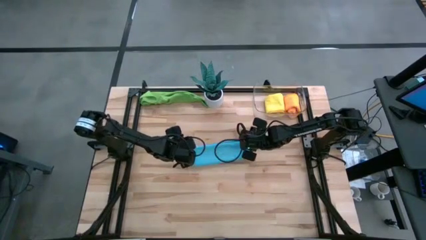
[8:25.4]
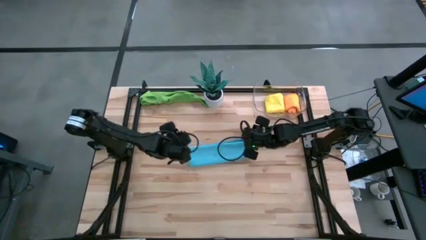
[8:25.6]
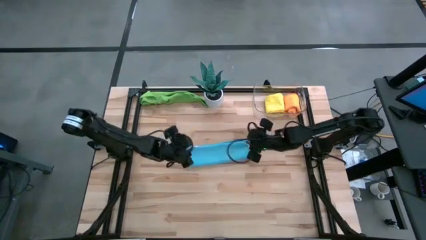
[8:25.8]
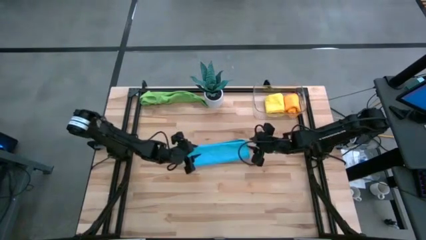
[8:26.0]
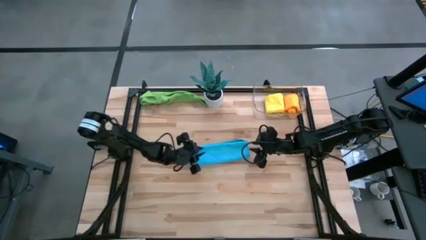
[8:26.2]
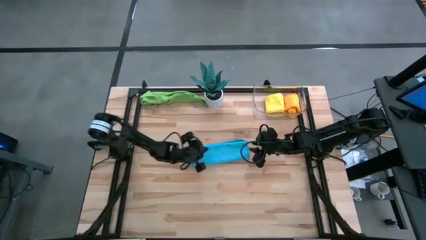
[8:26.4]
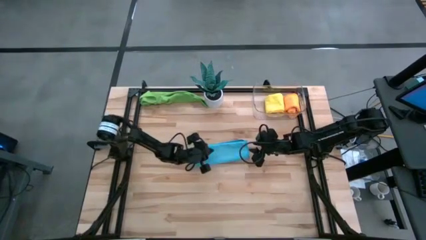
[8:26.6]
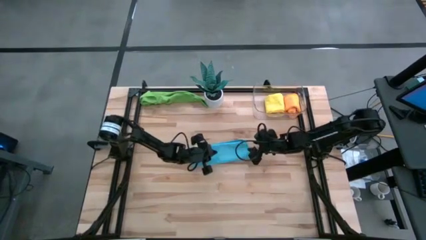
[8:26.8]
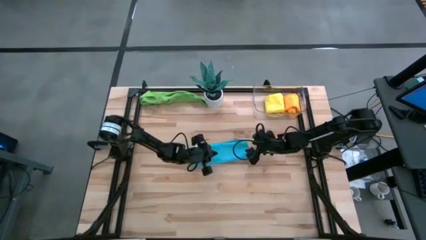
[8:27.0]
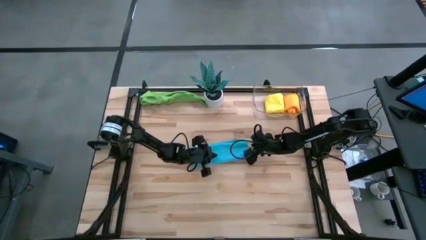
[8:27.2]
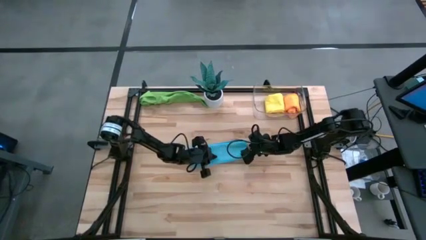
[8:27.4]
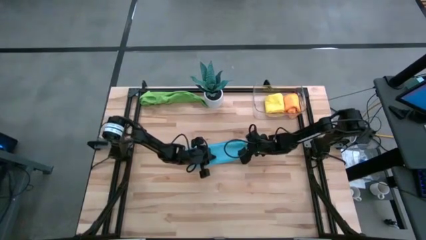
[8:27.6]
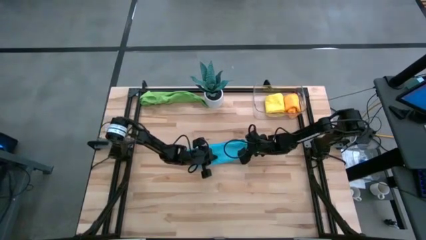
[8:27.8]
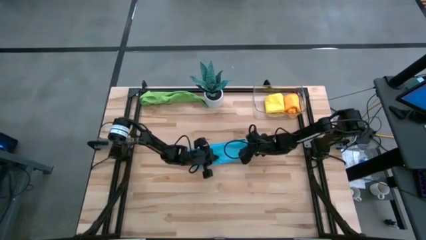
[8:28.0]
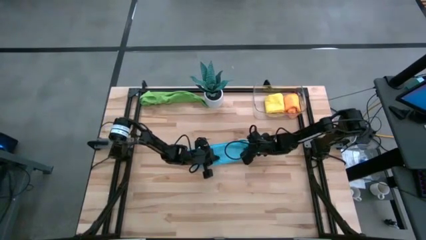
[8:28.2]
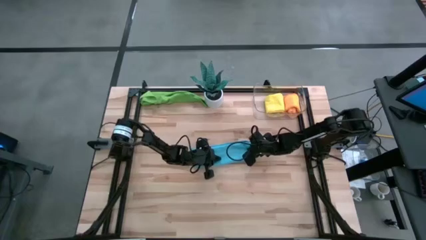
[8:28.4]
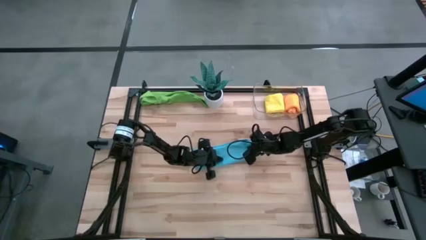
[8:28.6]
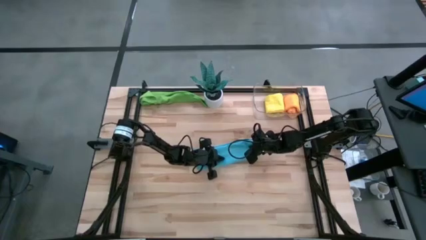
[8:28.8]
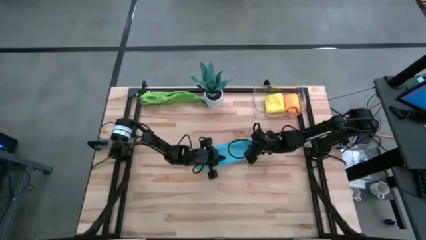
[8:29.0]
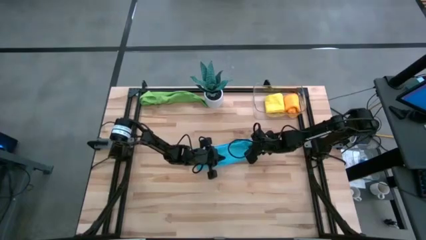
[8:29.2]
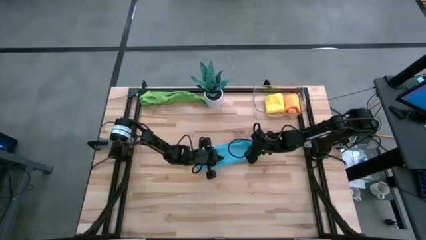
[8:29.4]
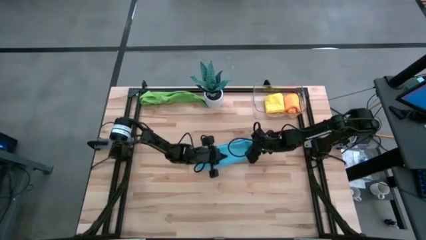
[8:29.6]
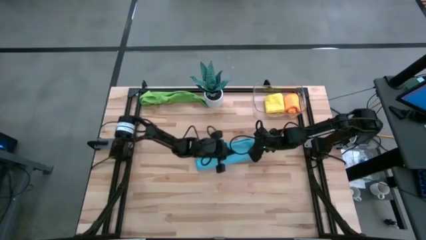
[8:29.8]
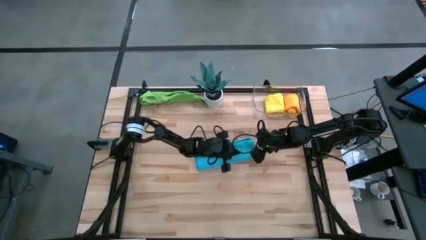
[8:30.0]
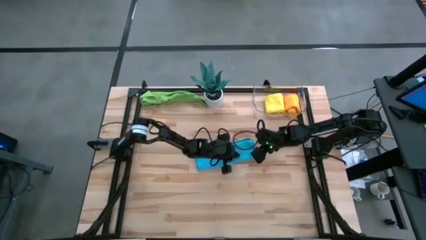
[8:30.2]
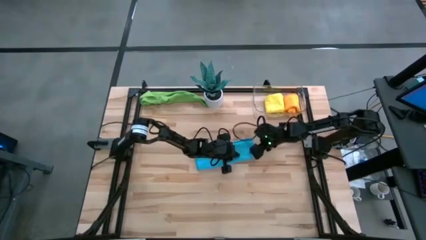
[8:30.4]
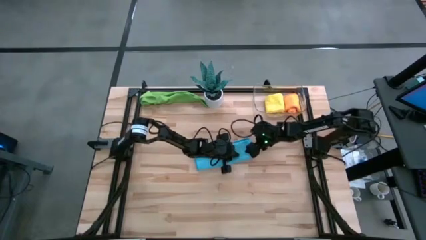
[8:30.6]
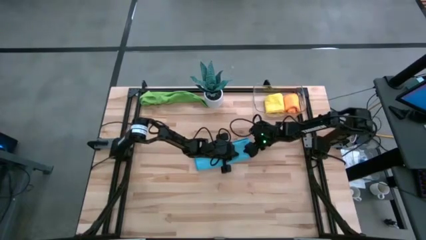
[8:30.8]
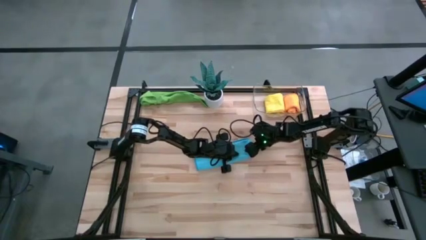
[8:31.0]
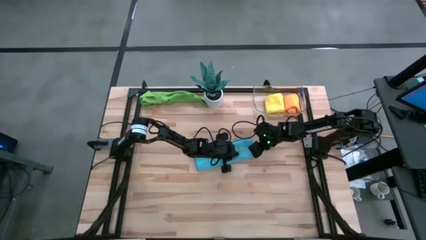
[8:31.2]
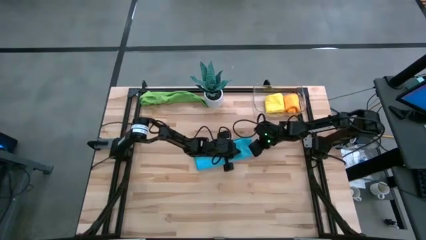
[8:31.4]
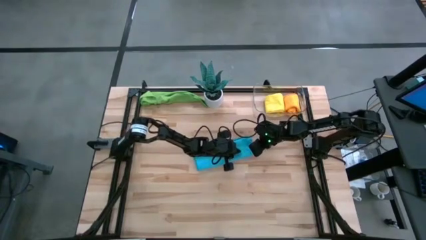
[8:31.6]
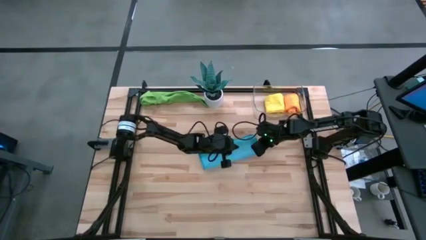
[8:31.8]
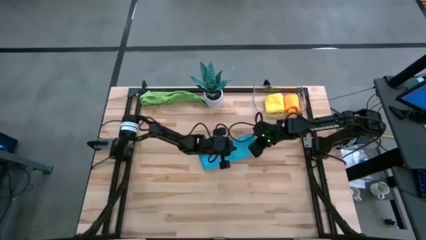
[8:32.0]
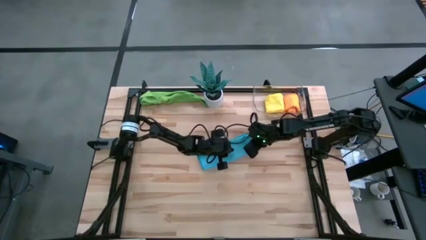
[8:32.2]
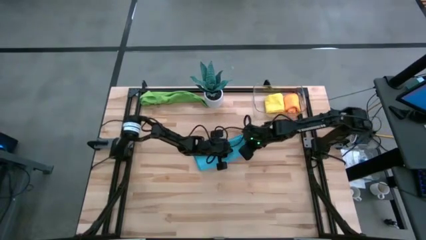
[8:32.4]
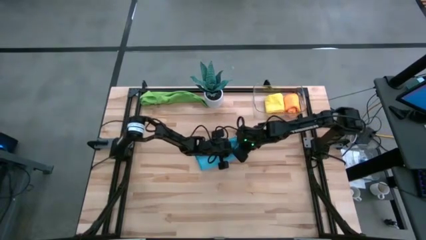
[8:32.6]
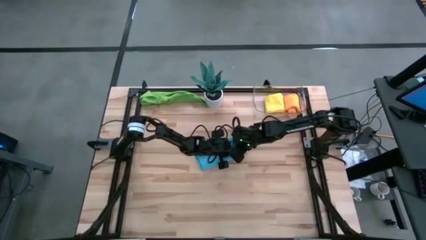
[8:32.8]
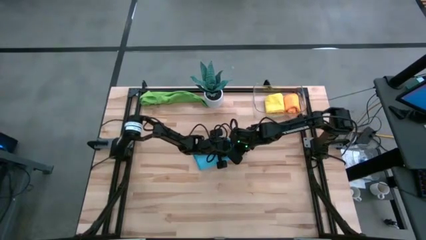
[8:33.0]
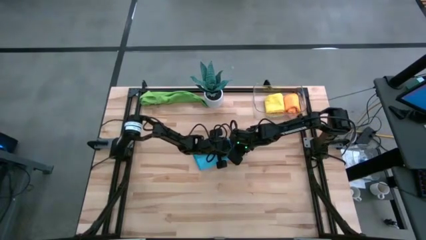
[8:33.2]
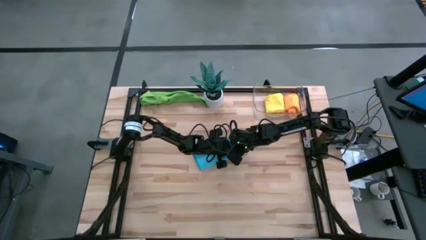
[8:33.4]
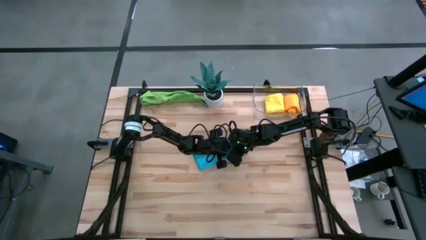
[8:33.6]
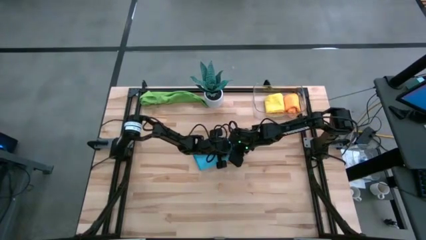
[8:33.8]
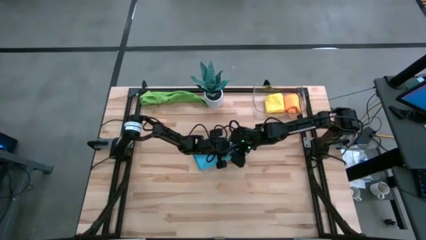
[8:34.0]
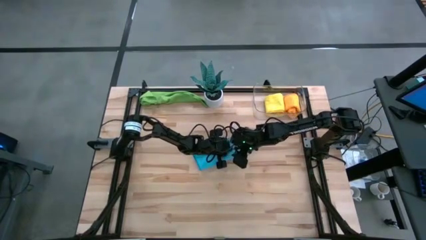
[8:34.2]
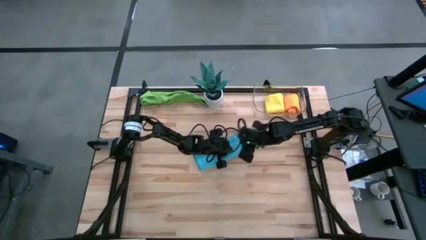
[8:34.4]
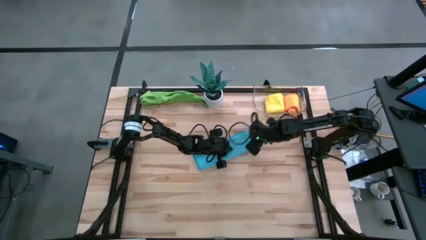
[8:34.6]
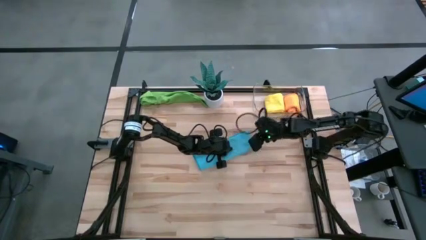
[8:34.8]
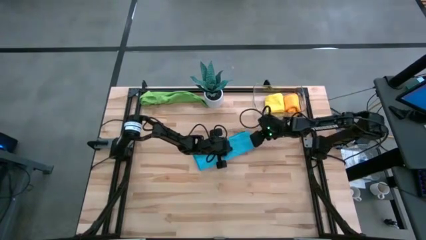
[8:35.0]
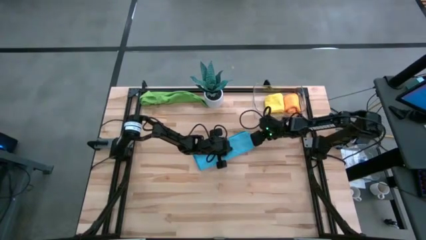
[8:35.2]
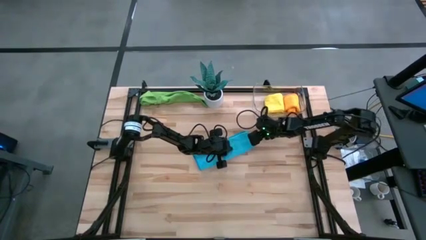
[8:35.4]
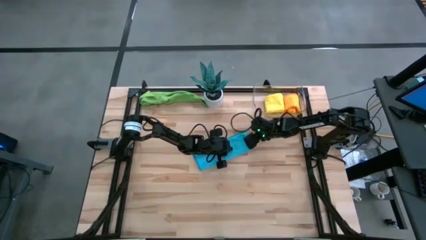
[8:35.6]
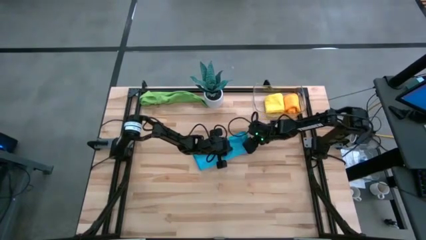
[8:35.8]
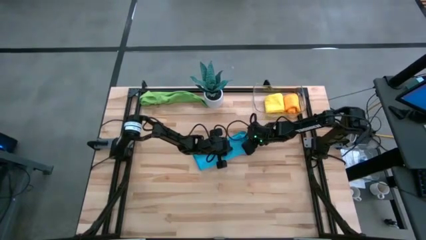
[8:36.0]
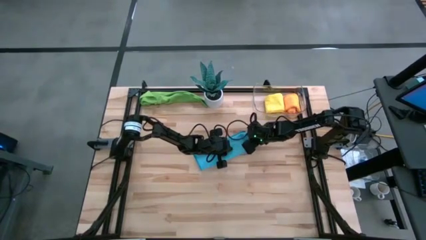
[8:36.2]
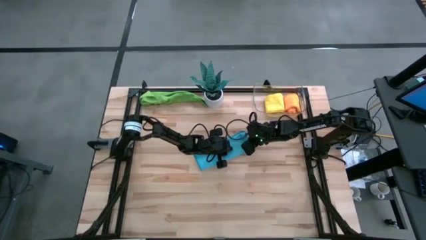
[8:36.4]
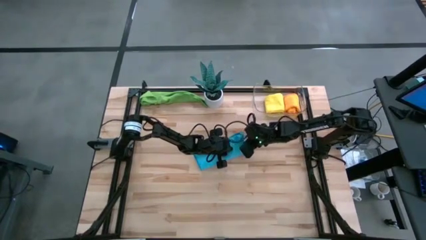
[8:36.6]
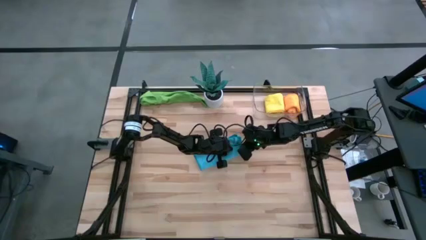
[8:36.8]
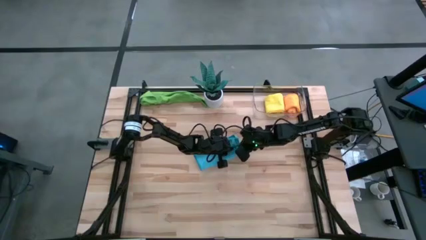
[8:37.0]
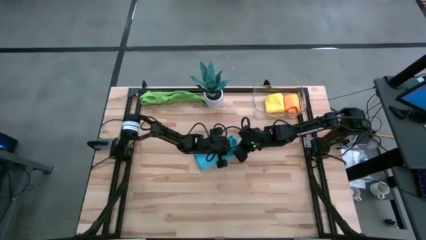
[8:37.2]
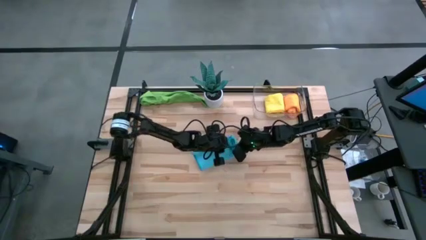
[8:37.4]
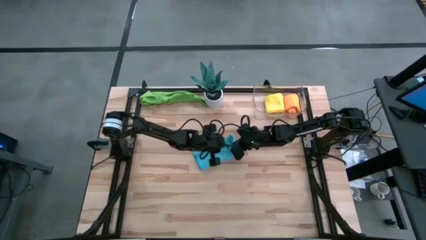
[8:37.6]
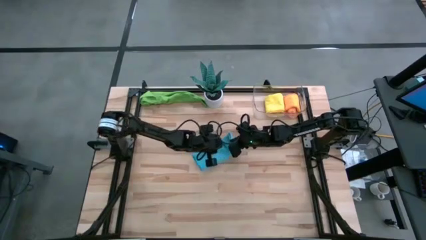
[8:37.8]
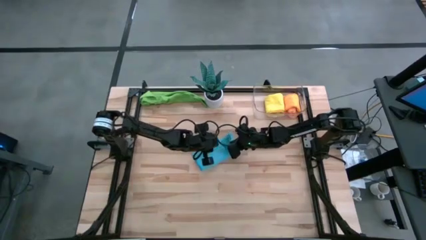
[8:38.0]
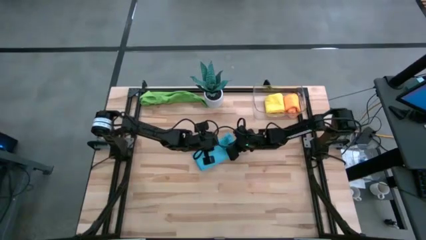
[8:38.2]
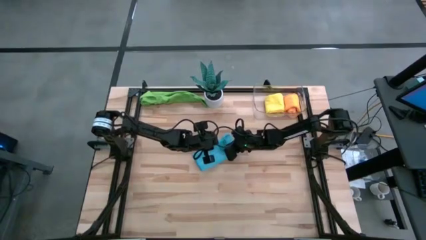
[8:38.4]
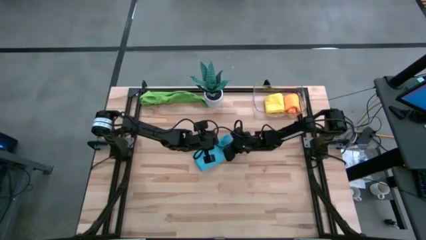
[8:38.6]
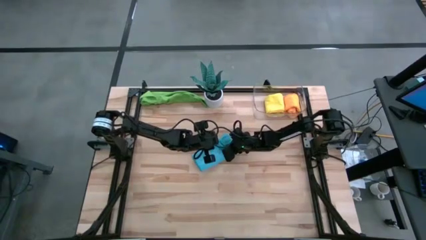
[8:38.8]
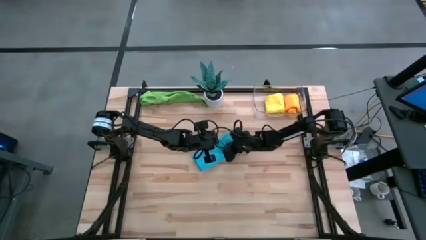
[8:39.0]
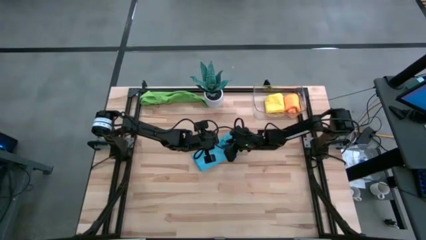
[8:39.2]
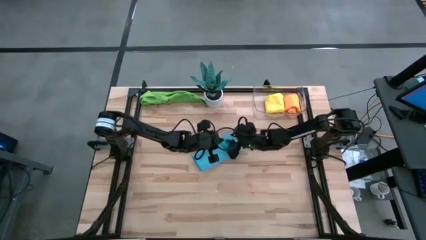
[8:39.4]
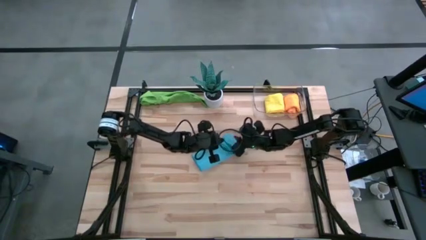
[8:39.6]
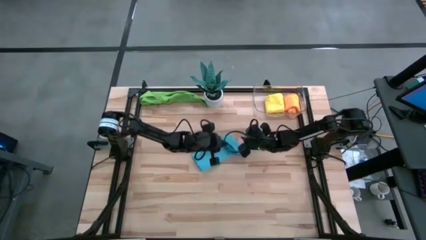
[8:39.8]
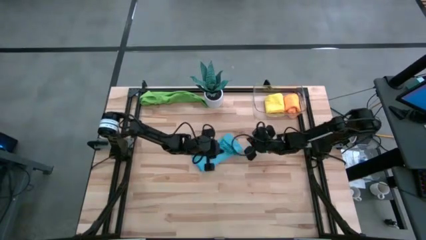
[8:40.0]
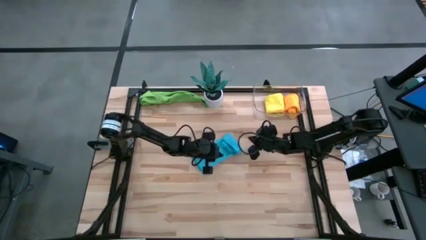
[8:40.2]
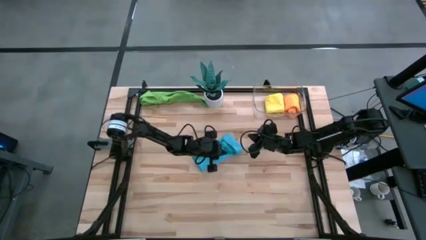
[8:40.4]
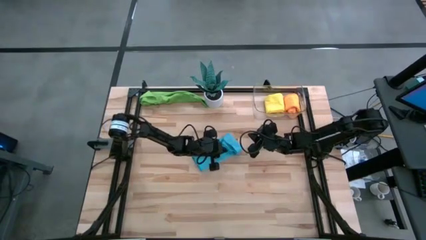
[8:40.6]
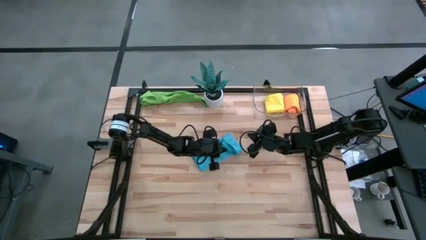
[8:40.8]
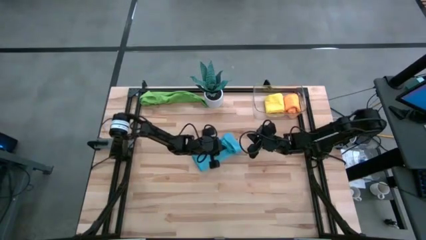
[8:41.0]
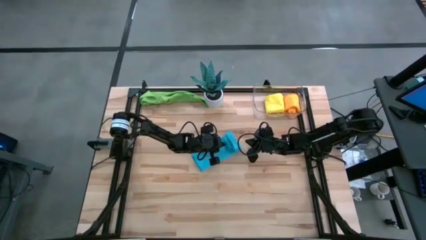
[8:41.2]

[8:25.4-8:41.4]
Task: Roll microfiber towels into tight, uniform cylinder then place into a basket
Roll the blue microfiber cloth

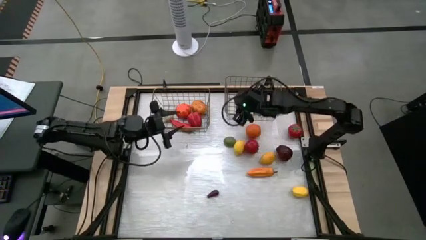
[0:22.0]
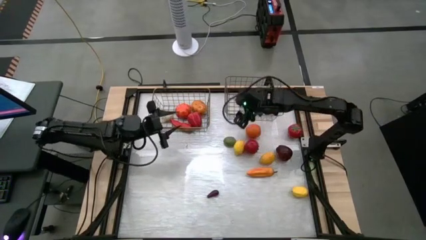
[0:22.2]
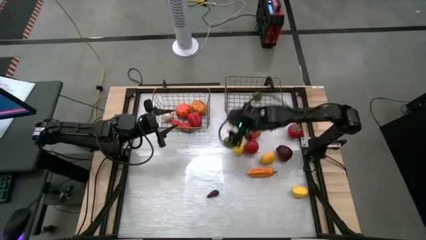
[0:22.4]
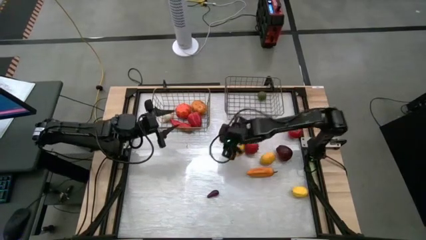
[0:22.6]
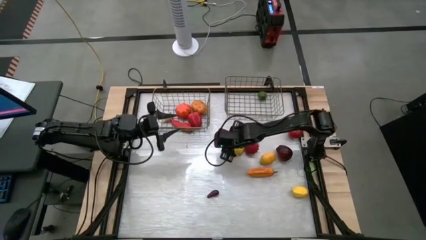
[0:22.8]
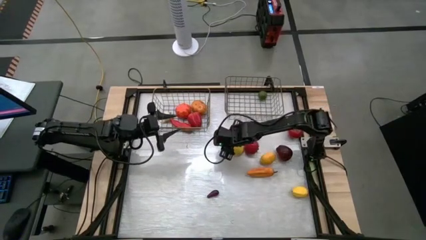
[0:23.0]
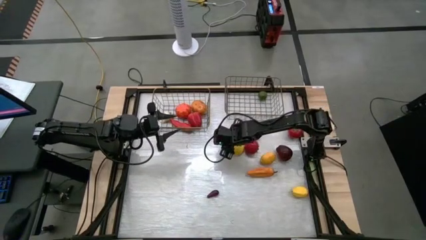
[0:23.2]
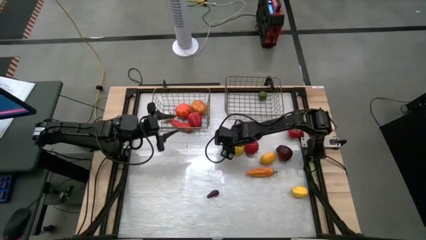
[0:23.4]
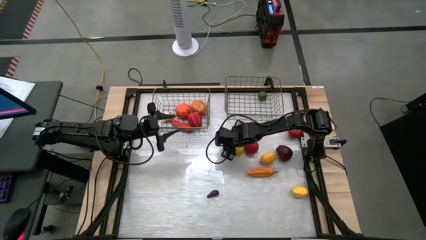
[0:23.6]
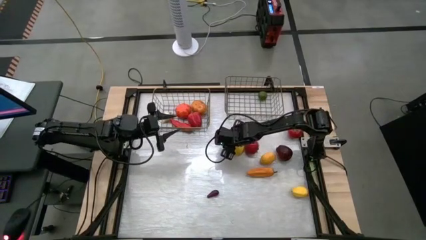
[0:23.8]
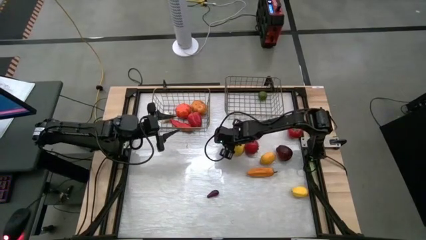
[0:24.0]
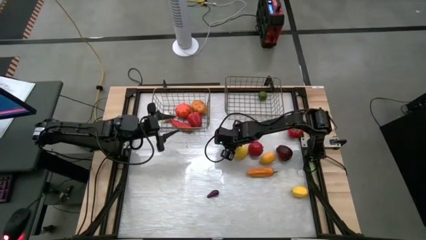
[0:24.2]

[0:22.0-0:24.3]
Task: Sort produce into baskets
Put the green lime into the right gold wire basket
